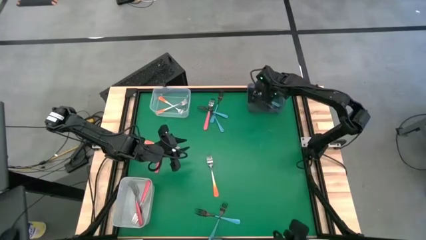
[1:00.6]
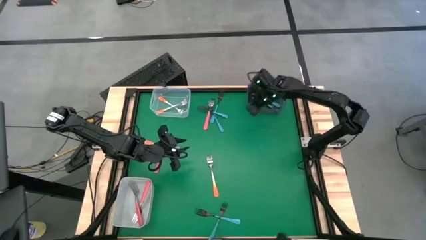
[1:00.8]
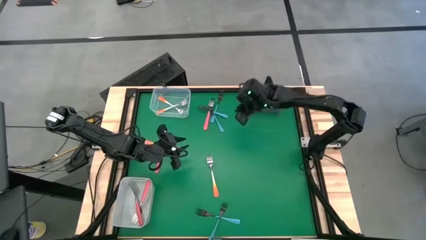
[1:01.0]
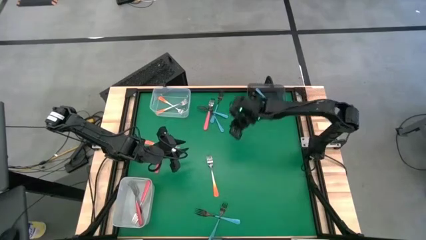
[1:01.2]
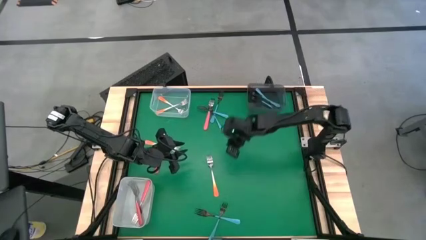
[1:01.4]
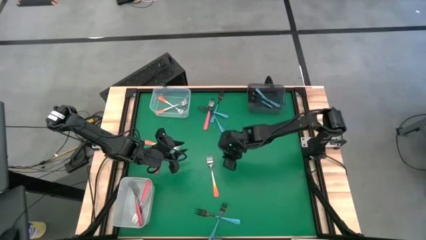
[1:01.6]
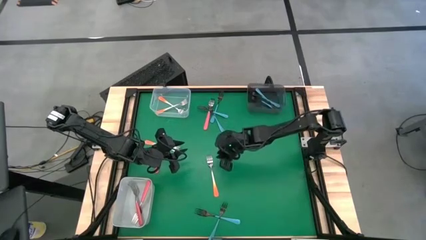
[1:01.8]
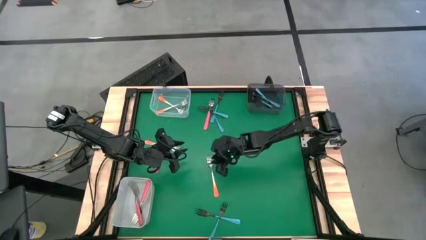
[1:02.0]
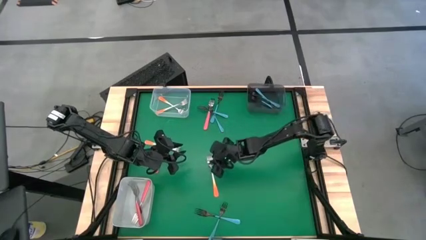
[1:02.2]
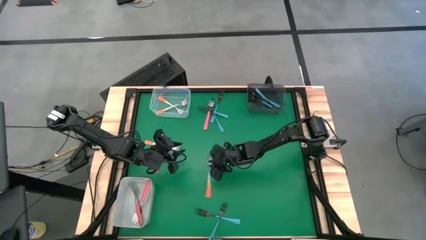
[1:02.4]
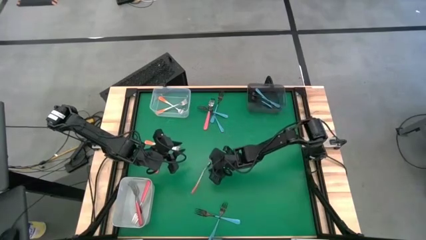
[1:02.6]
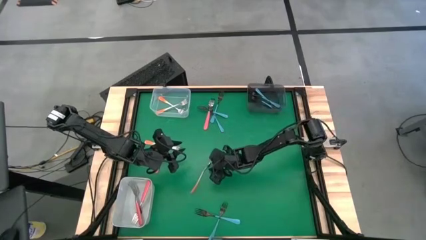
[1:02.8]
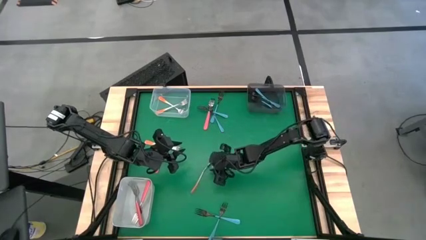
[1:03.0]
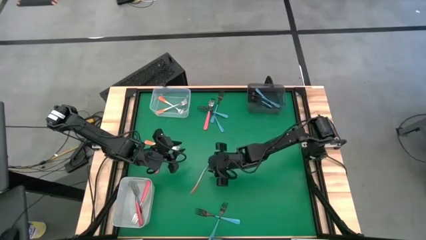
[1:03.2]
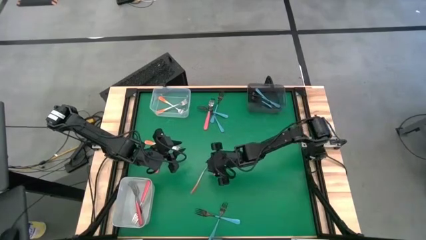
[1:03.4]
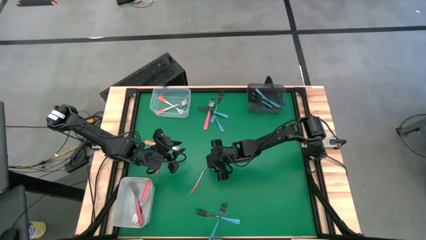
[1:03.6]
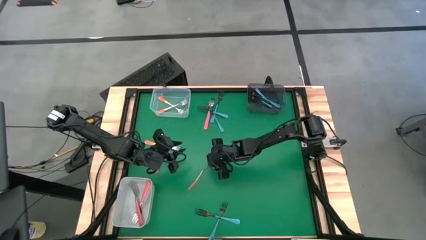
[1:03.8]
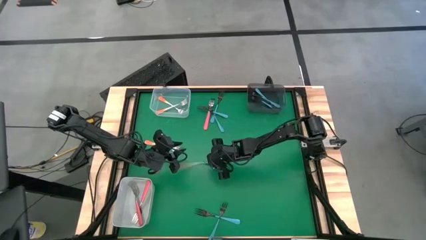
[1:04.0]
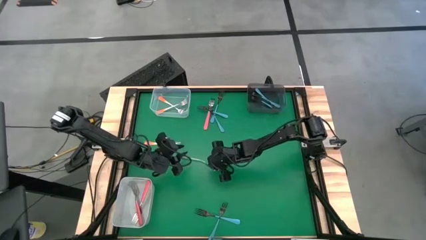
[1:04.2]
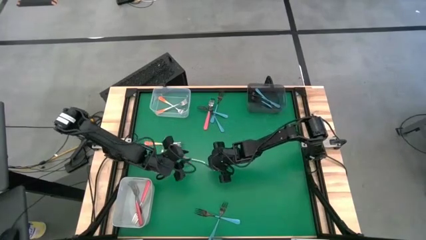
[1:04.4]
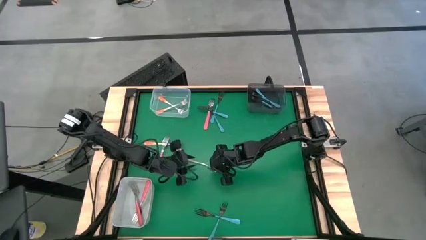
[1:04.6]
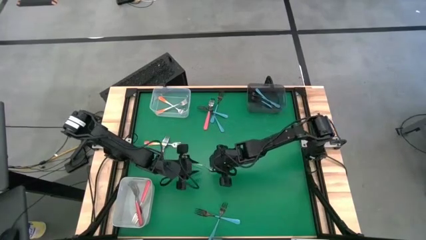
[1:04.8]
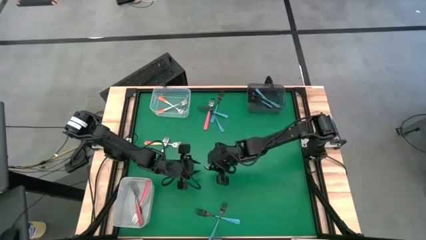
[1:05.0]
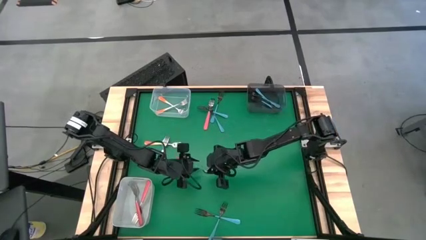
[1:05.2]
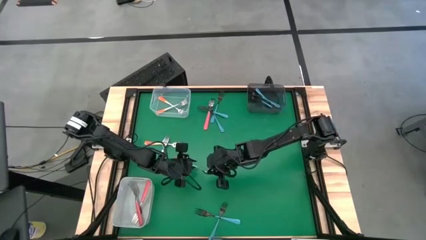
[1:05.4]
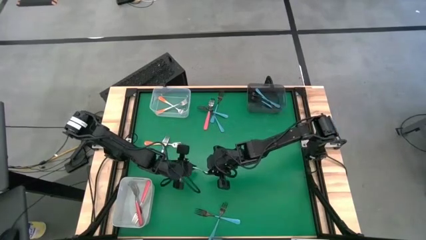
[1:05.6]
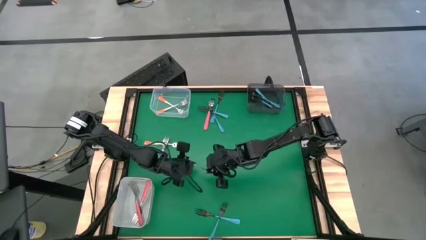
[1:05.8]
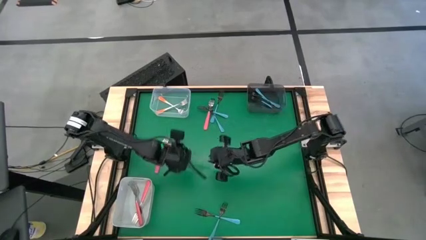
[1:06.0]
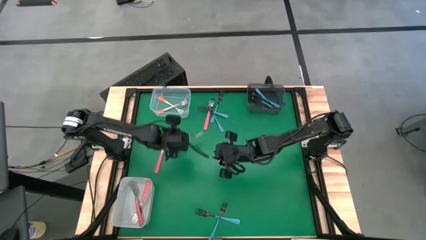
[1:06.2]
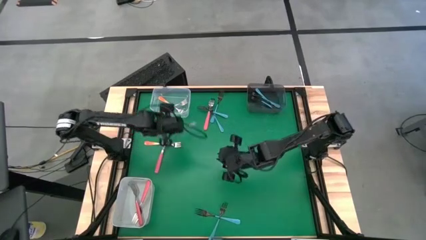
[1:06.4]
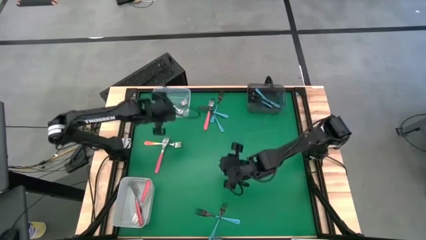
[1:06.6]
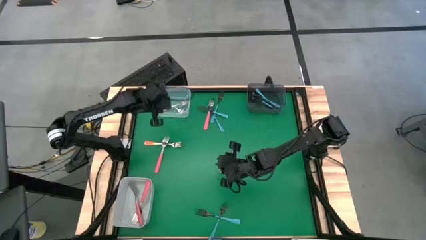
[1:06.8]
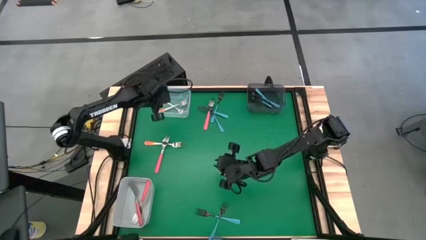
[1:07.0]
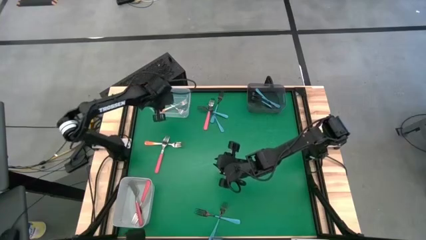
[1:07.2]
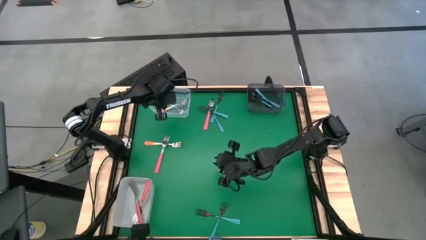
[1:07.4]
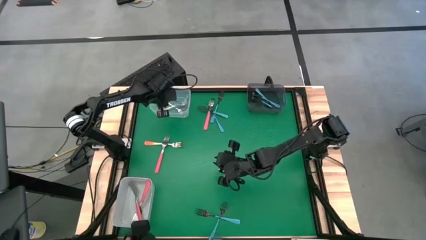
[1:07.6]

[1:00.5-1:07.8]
Task: Sort silverware by color (type)
Put the orange fork into the transparent bin

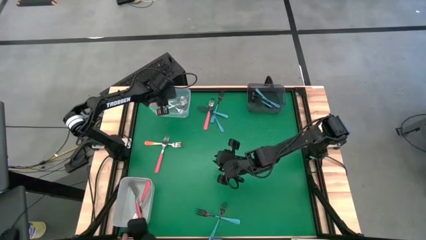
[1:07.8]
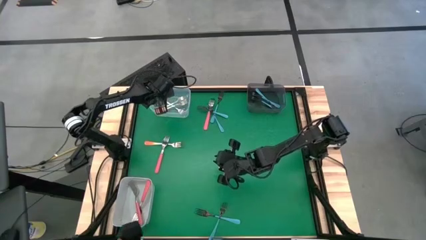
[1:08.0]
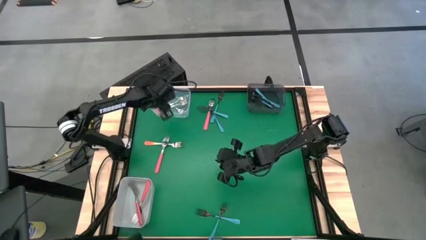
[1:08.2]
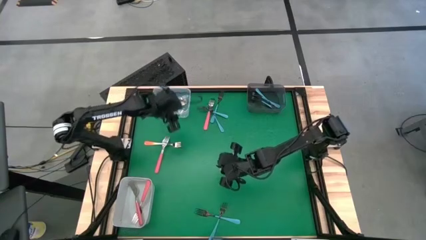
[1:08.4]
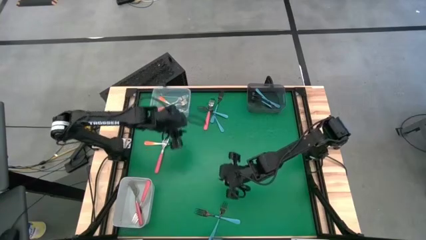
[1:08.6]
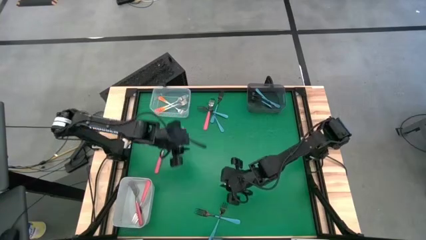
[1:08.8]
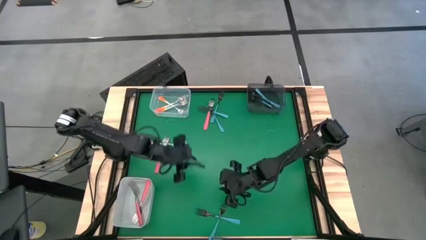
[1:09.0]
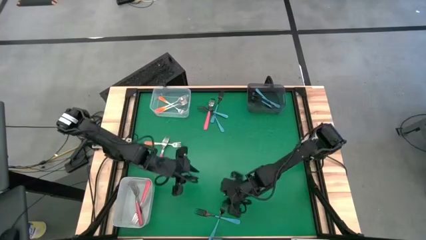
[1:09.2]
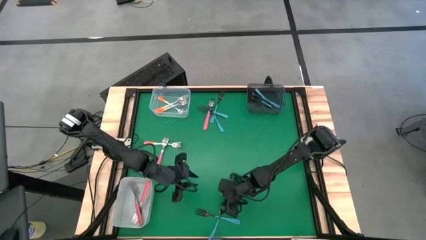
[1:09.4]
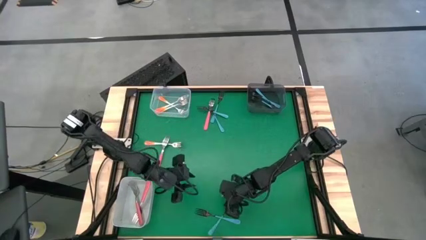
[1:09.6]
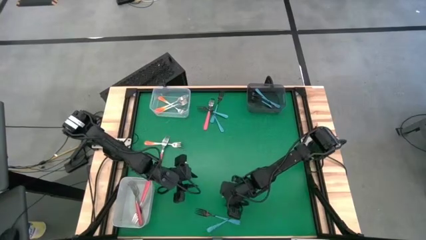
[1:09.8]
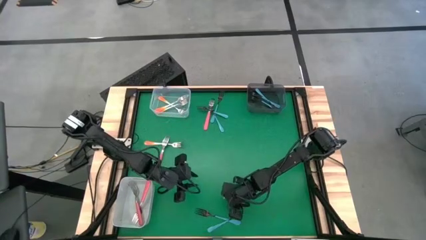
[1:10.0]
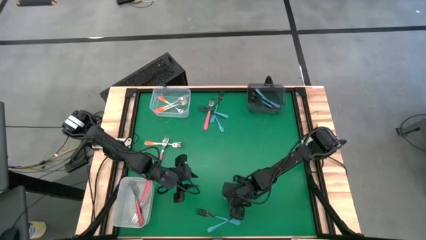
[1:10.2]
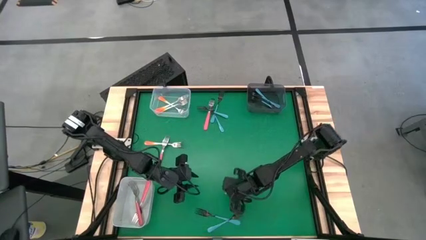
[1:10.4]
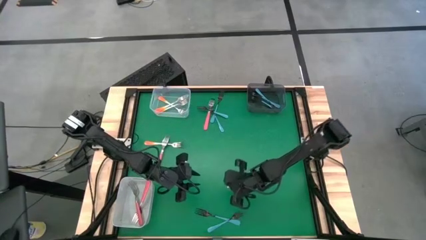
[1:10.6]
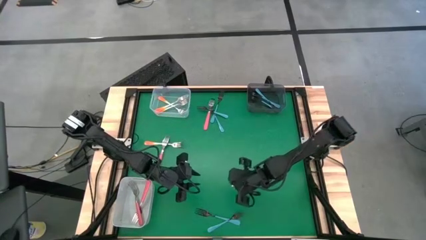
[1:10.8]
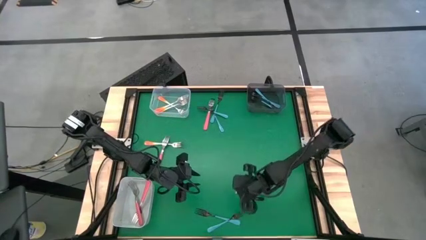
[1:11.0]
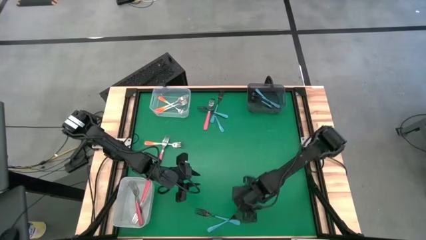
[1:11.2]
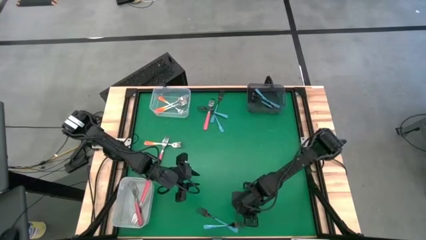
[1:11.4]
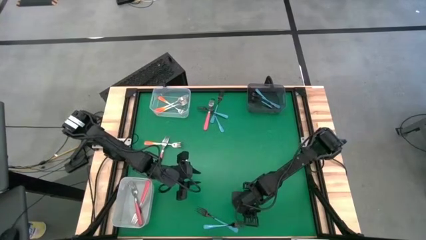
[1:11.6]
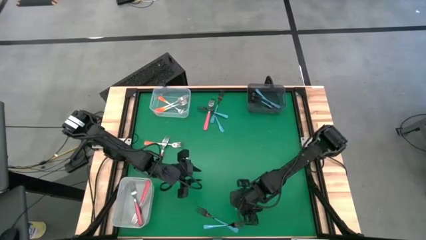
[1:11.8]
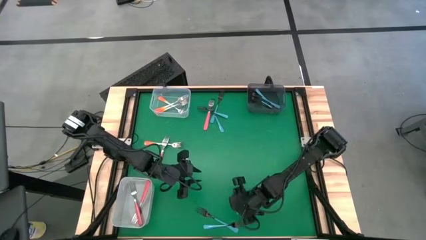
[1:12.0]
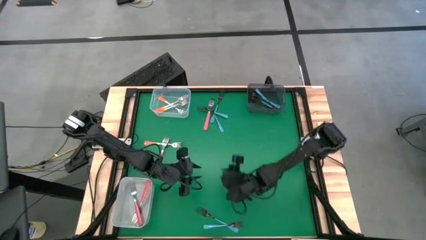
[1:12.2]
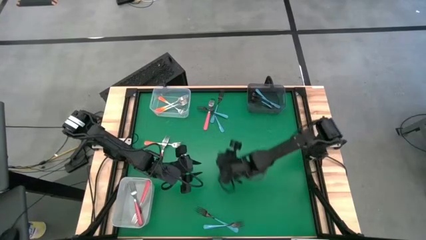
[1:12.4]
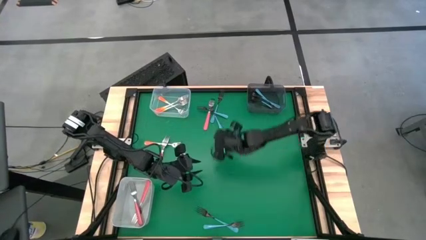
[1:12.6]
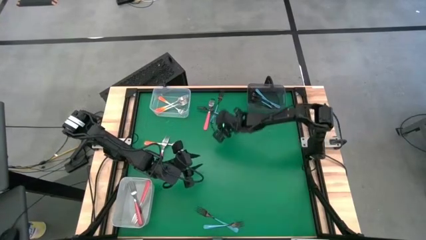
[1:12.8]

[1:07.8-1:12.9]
Put the blue fork into the black bin

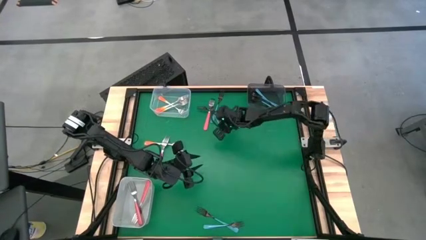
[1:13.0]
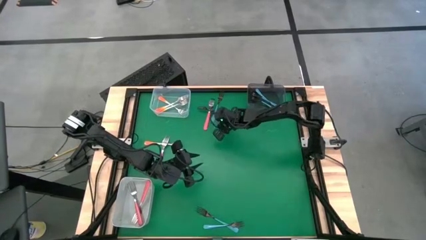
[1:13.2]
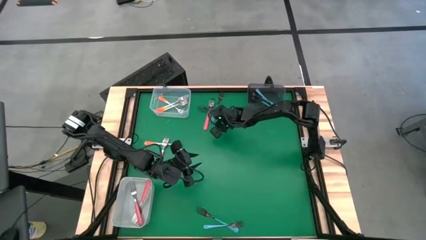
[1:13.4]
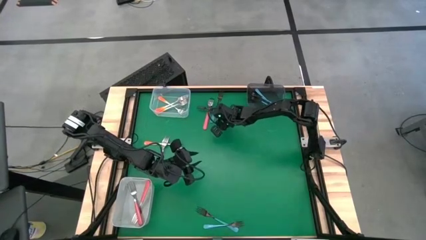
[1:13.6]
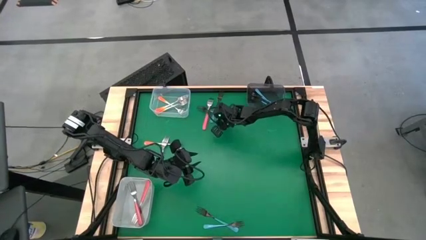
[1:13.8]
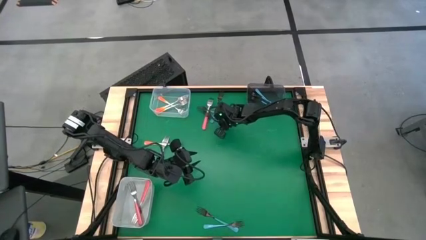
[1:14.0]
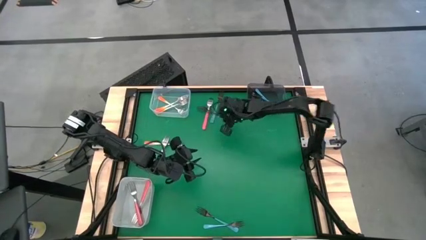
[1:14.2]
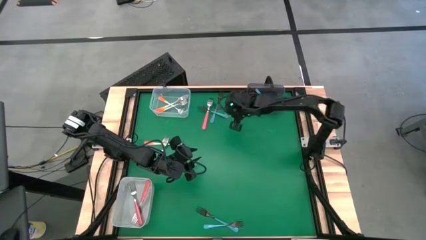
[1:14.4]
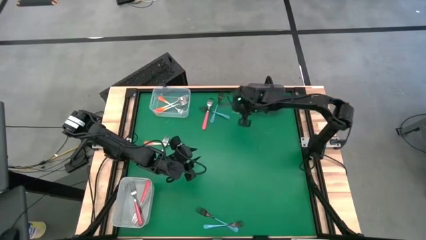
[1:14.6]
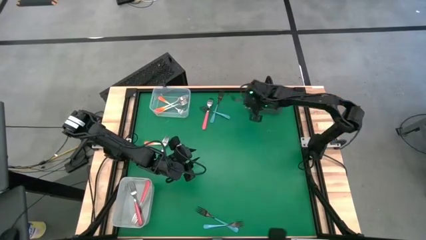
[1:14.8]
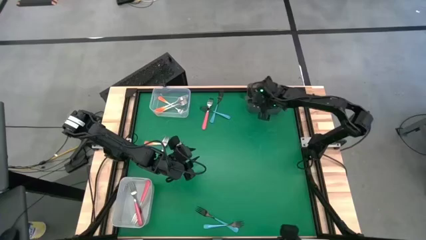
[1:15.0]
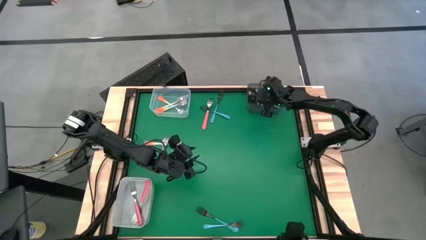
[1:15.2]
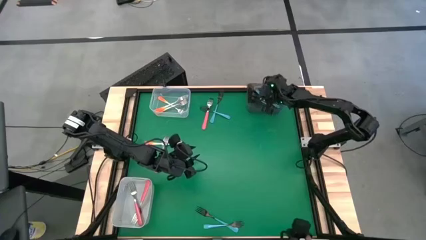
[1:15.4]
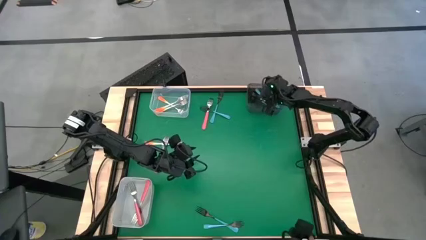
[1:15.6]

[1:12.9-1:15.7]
Put the blue fork into the black bin

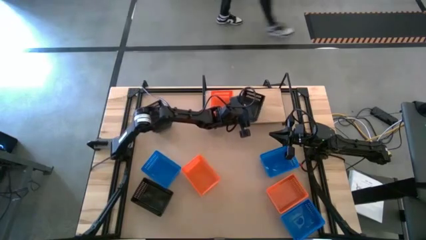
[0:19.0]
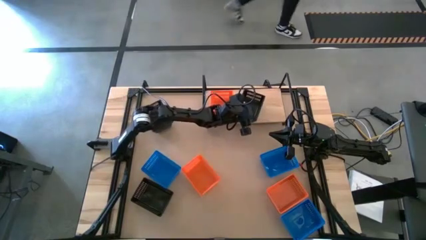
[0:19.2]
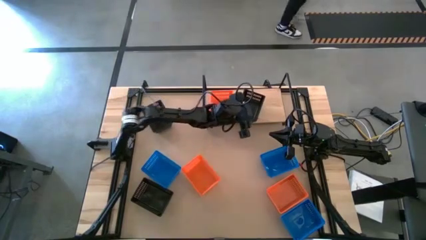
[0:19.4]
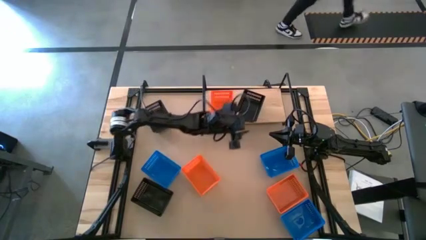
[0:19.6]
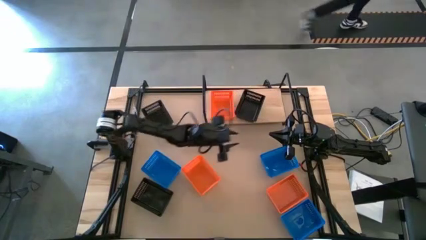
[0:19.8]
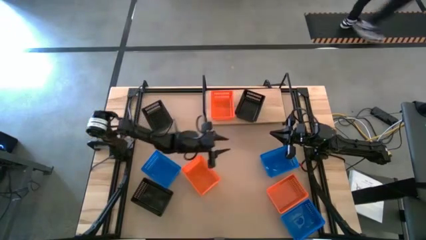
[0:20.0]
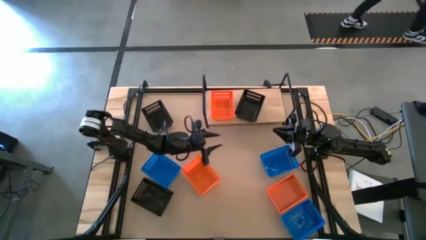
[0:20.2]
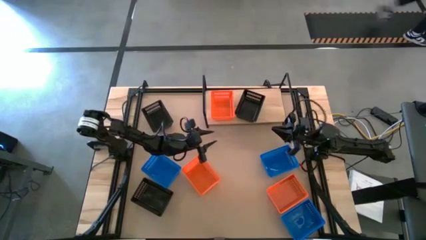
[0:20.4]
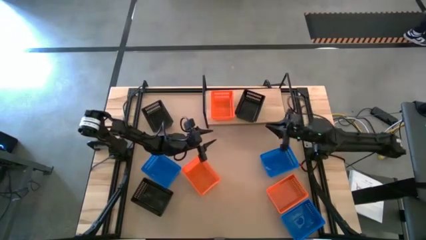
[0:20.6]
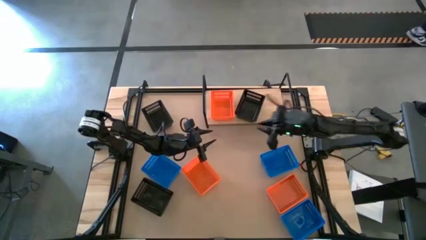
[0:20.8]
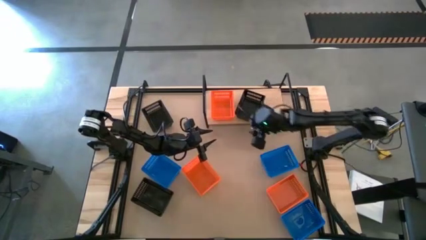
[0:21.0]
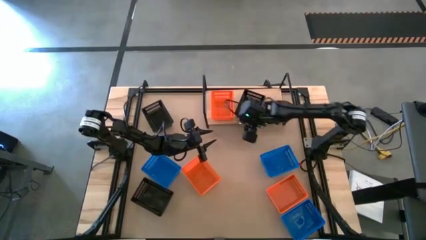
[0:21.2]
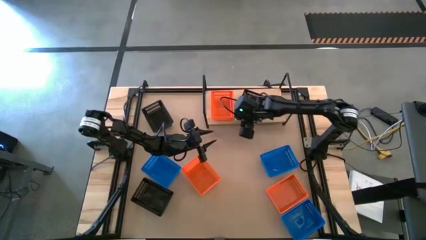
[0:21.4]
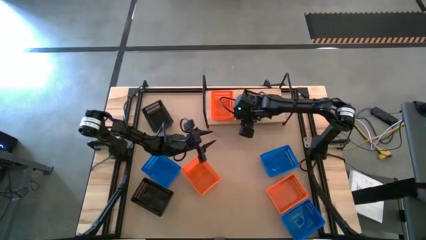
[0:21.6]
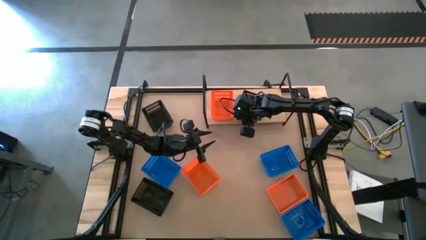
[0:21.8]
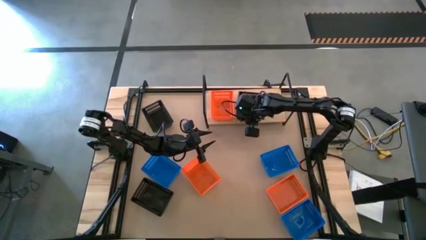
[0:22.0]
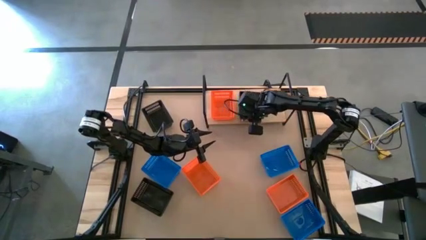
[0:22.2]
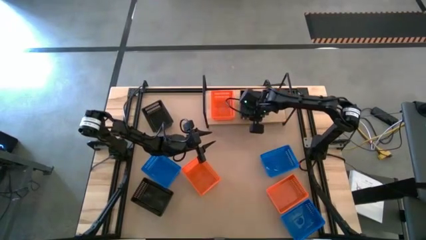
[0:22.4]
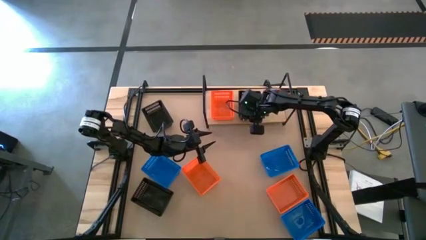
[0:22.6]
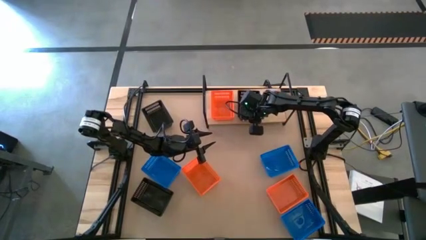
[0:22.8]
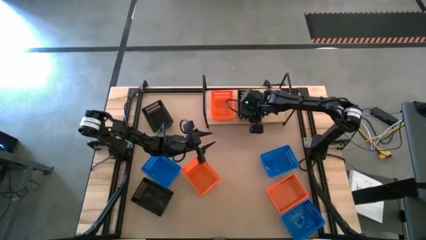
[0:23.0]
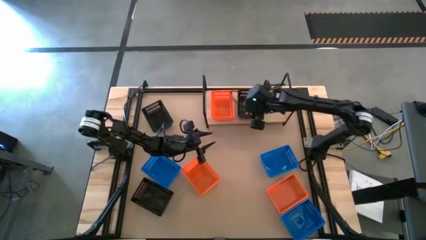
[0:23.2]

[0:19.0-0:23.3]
Task: Stack baskets on shelf by color
Adjust the black basket on the shelf
